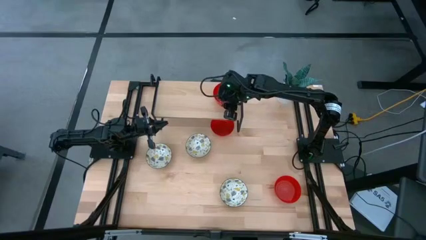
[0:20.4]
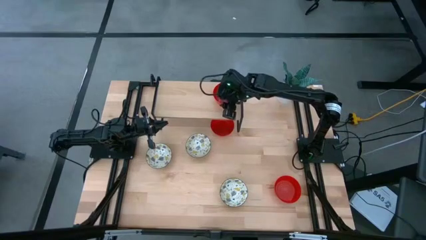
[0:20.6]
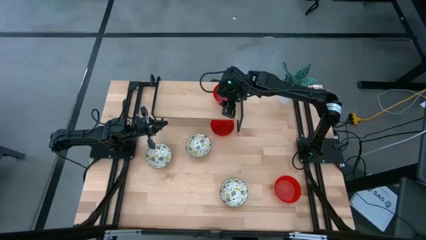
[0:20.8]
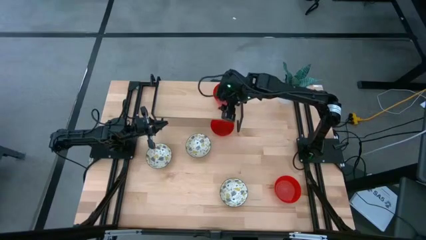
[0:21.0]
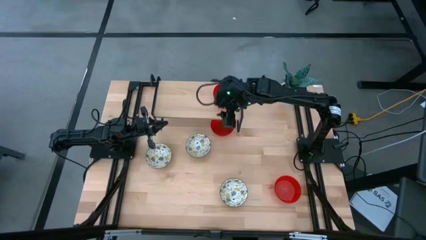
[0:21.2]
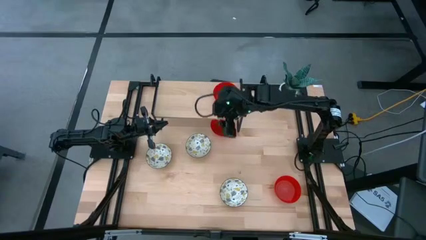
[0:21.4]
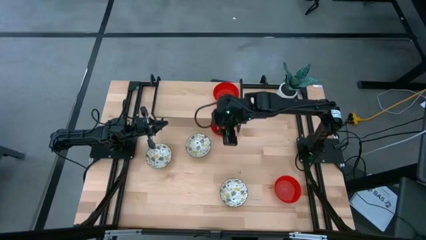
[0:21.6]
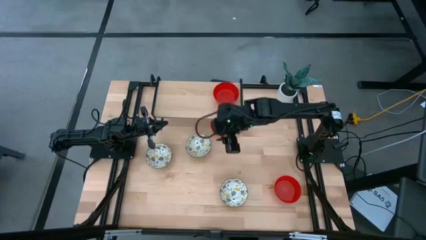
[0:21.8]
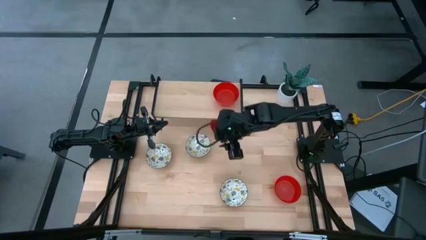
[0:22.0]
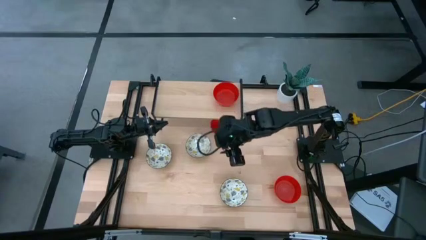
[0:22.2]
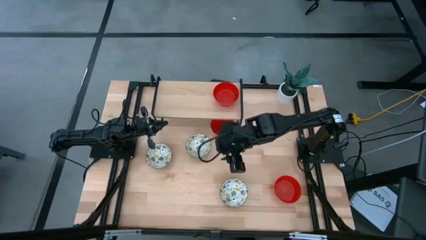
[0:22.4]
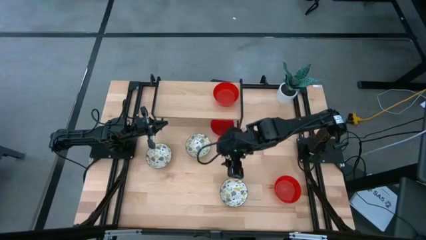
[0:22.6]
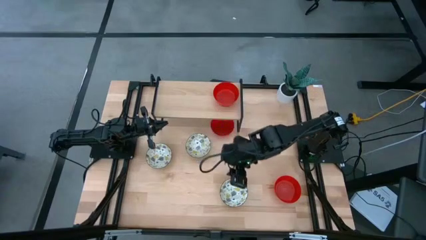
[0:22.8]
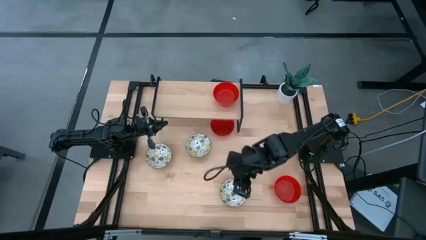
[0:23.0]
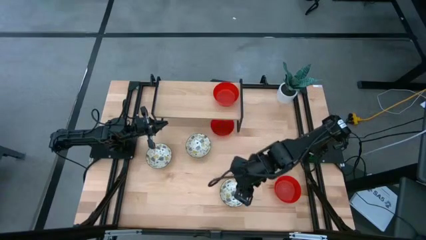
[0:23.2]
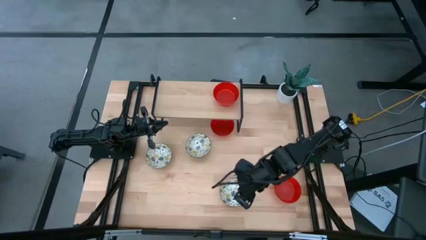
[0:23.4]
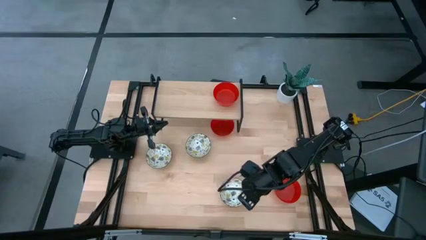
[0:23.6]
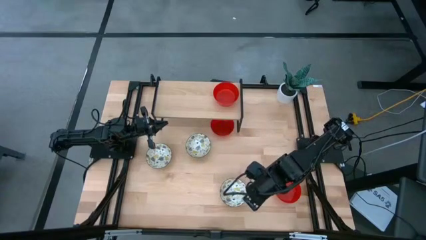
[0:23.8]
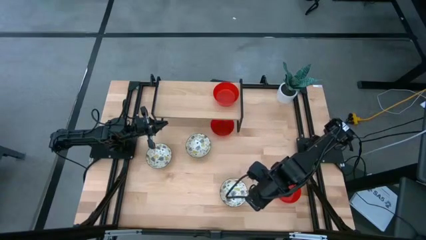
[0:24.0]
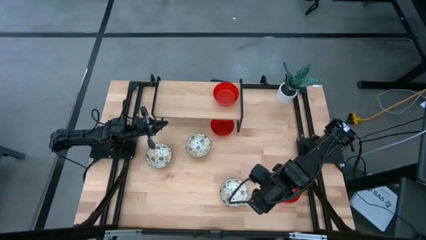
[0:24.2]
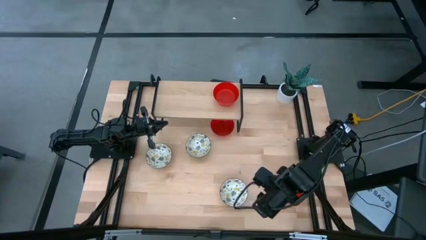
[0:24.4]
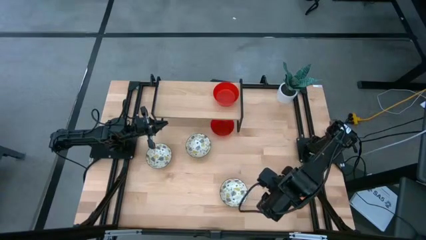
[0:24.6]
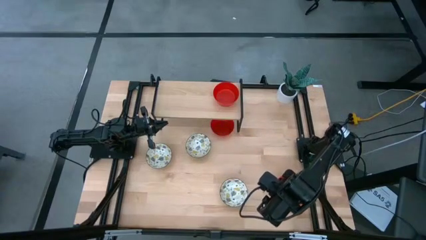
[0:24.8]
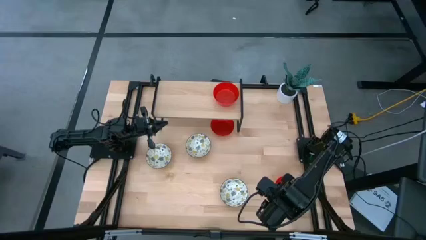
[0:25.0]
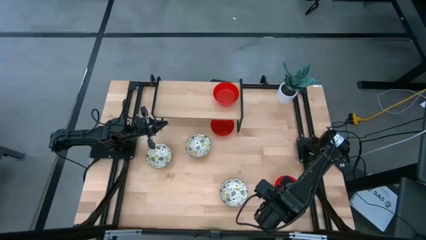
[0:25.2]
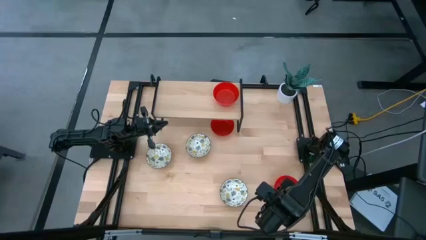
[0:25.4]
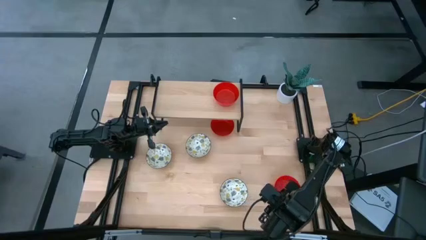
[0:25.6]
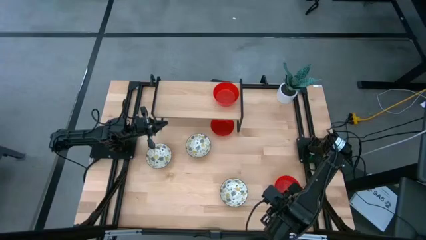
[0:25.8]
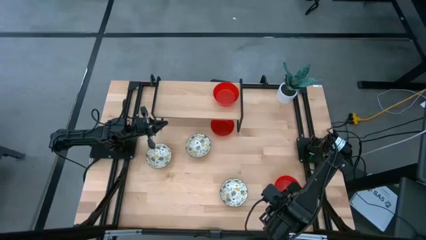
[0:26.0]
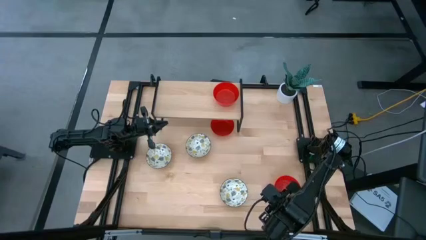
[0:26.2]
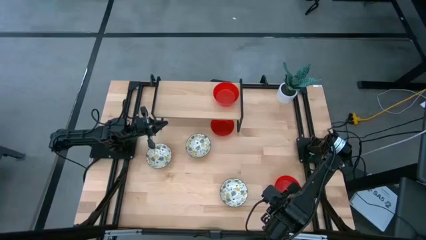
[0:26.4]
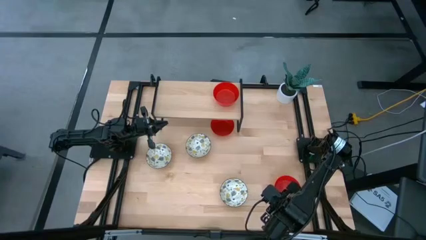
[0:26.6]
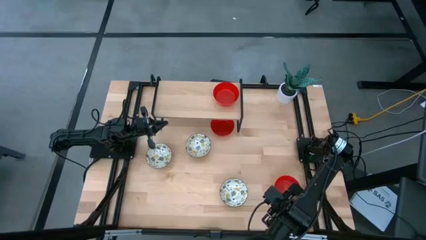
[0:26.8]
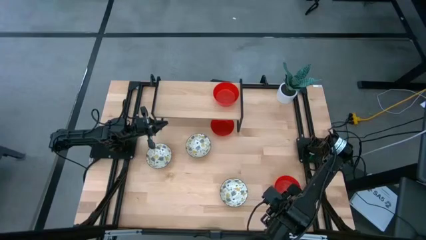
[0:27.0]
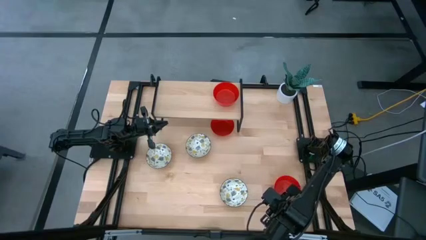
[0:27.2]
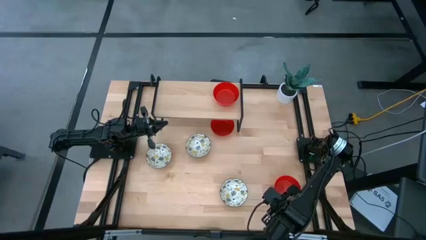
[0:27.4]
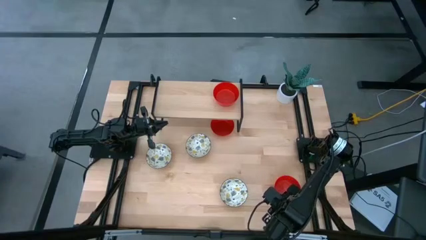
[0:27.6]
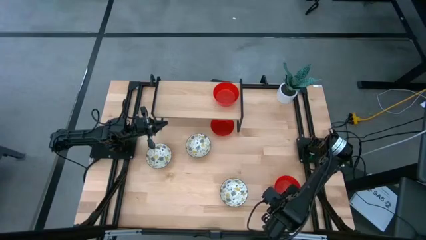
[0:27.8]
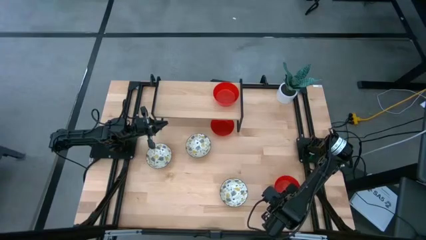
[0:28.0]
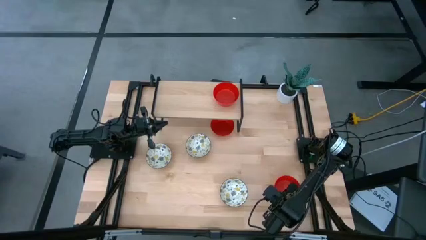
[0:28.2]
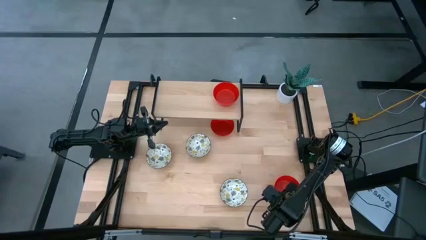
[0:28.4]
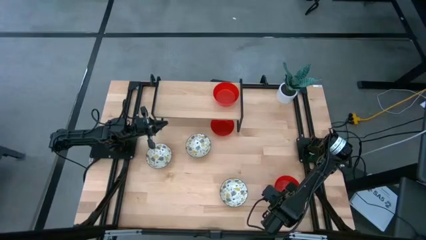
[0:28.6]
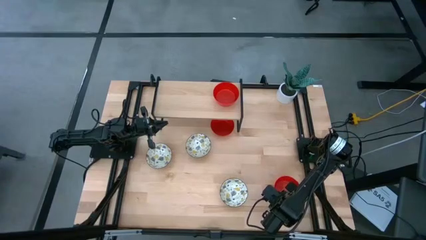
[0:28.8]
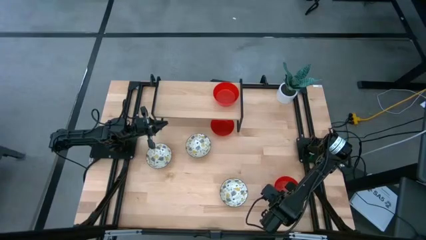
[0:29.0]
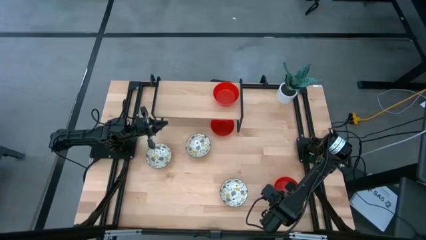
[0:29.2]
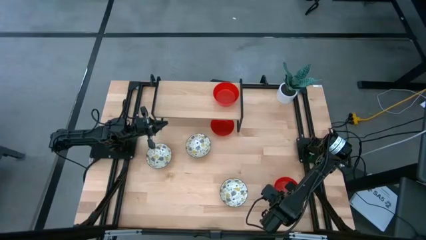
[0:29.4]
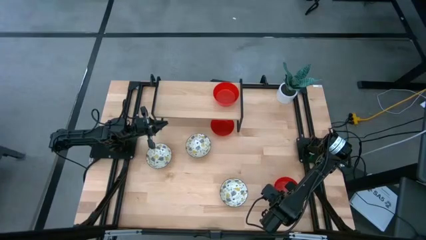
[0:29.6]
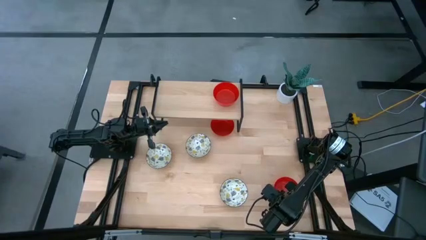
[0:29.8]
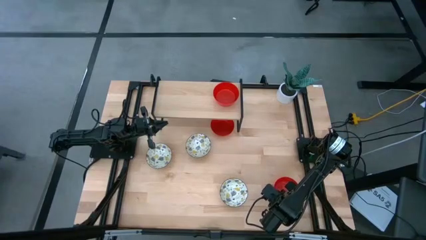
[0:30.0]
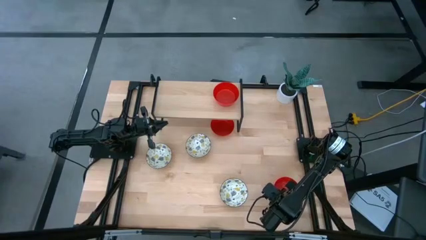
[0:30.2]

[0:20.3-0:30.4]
Task: Pick & Place Mini bowls
Stack the bottom red bowl on top of the red bowl on the shelf

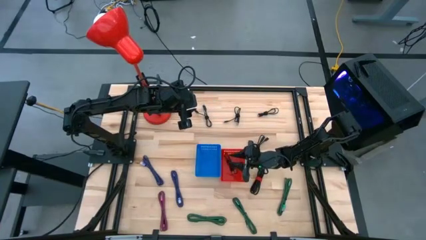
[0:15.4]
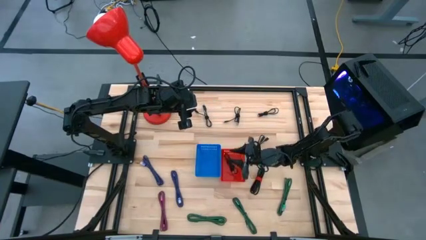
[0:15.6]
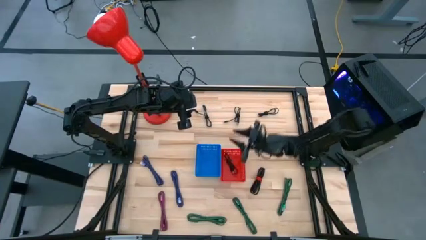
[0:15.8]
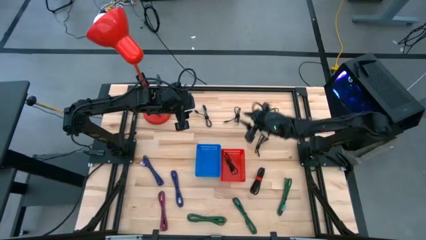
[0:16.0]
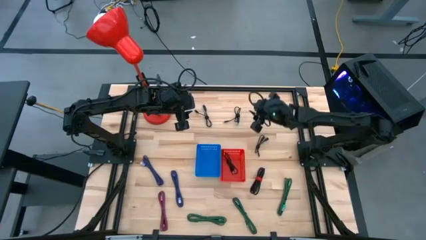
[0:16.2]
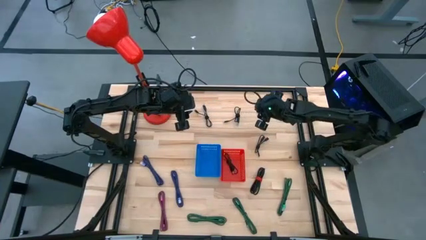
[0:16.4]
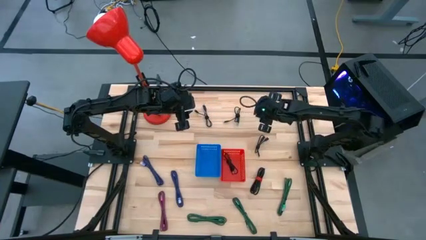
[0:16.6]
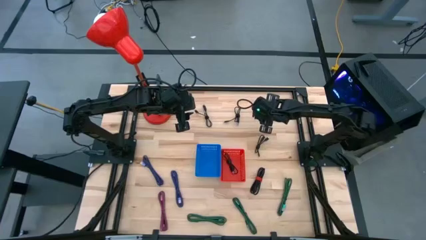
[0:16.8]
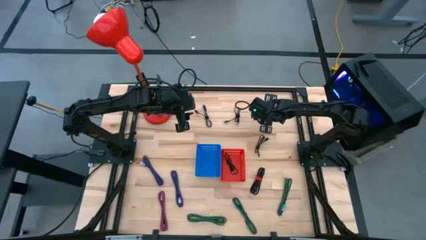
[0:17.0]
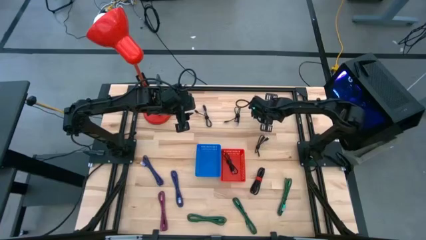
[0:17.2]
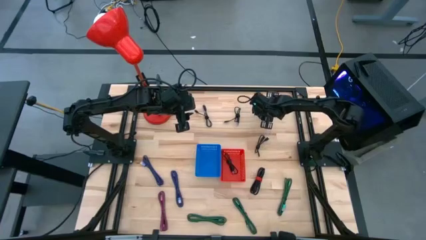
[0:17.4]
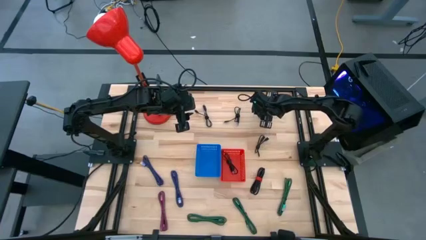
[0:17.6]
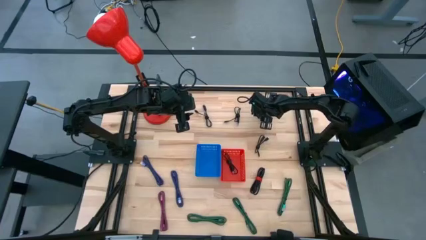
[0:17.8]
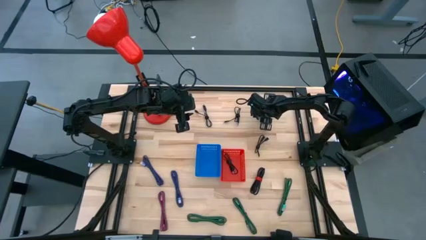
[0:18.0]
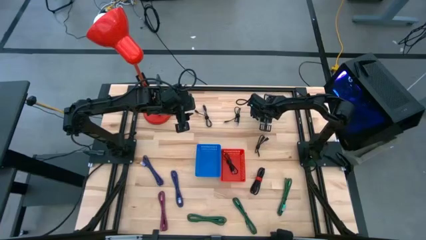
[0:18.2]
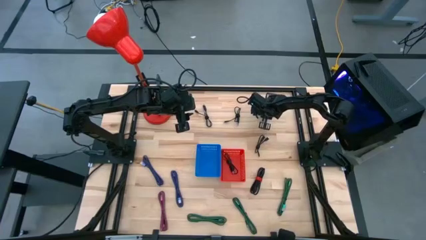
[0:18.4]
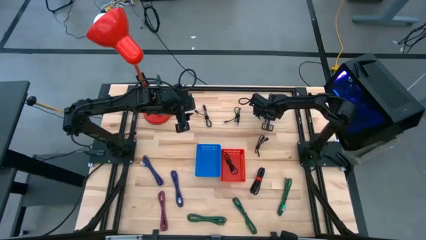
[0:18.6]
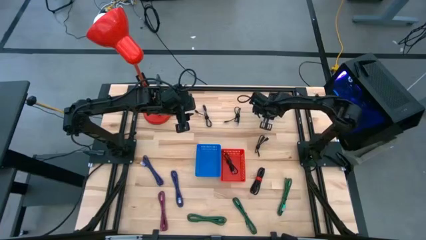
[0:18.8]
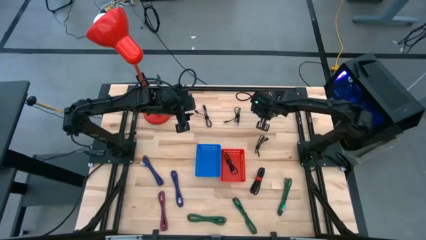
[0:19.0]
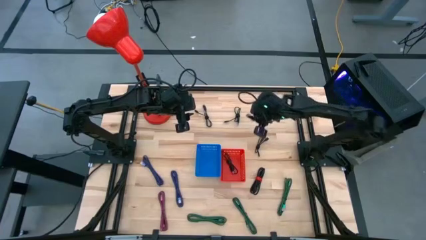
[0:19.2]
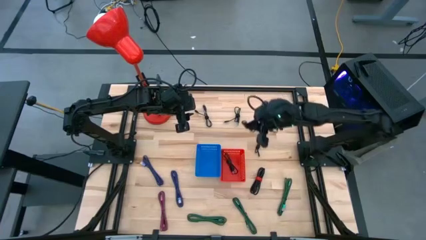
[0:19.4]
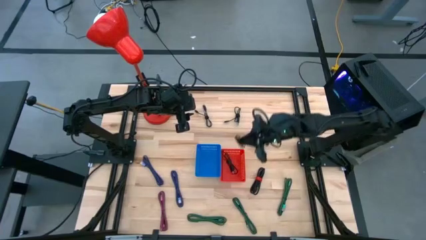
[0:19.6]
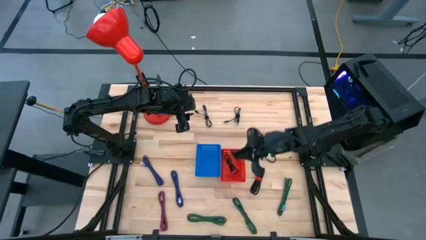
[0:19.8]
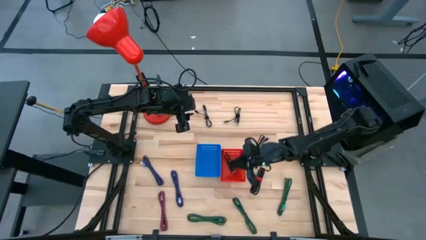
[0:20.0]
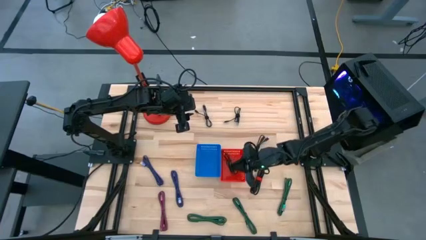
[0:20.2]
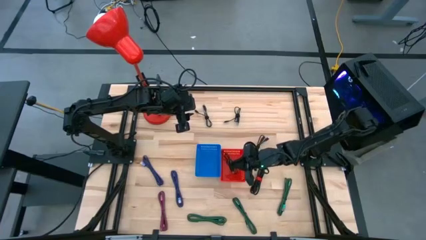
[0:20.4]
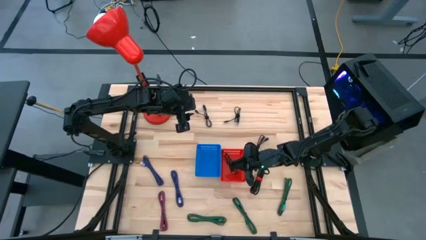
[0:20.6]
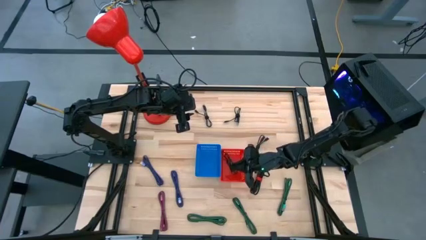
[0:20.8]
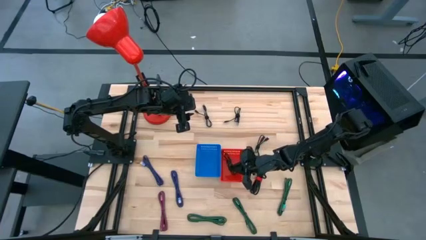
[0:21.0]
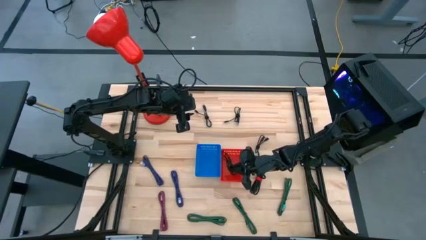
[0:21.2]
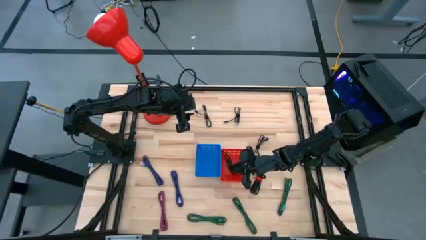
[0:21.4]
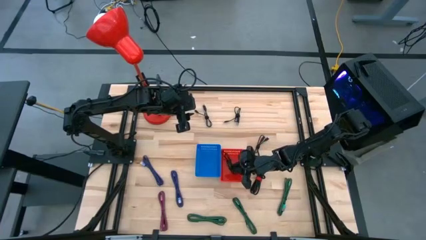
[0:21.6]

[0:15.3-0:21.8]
Task: Pick & Place USB Port
Put the black charger cable into the red bin
